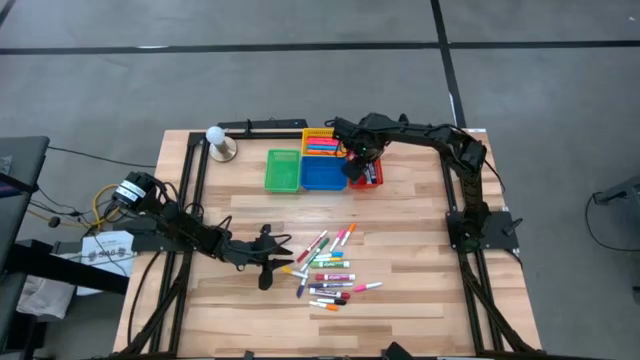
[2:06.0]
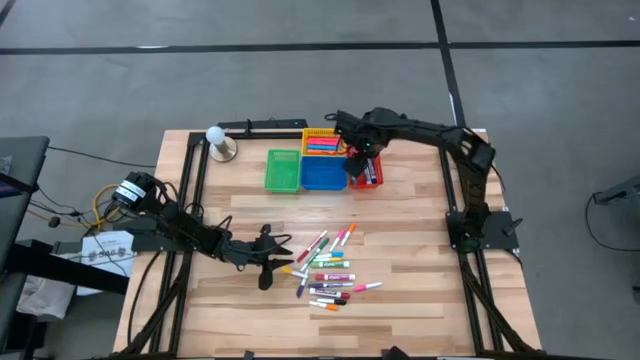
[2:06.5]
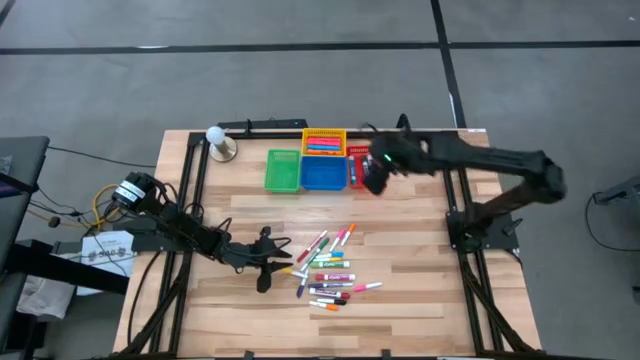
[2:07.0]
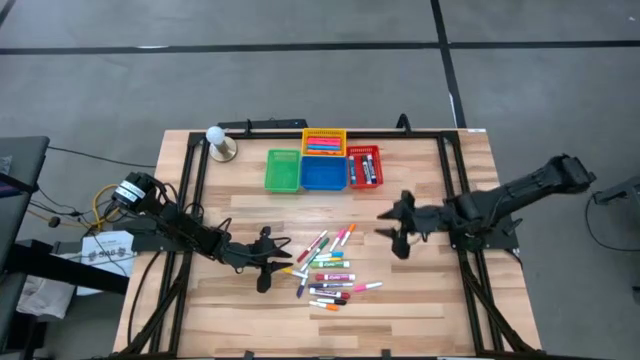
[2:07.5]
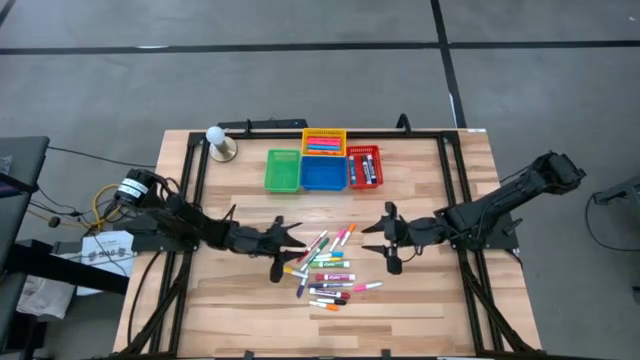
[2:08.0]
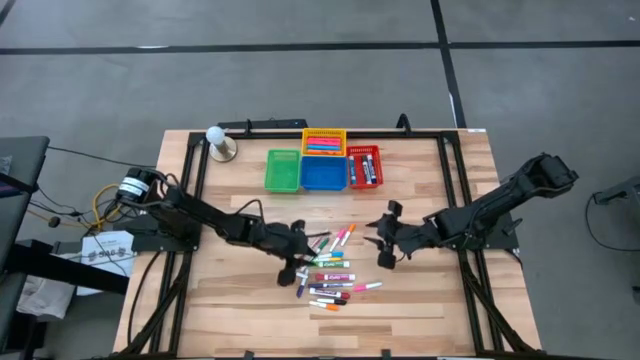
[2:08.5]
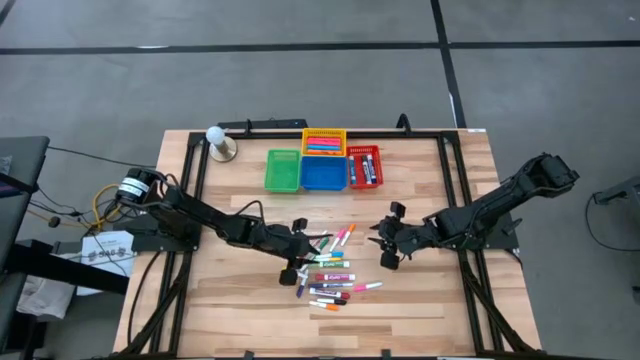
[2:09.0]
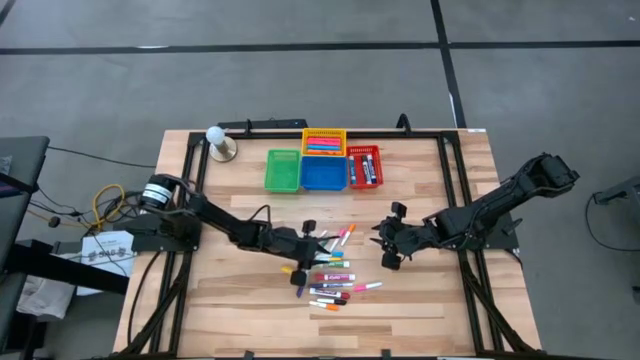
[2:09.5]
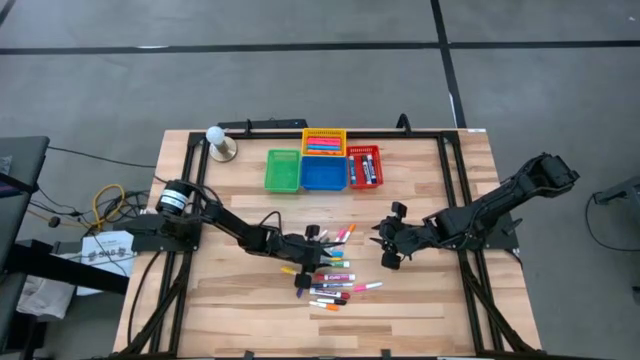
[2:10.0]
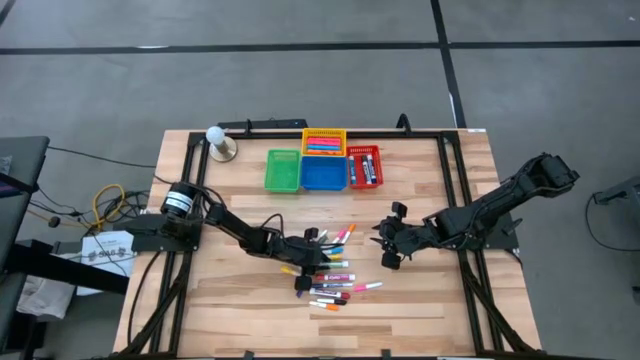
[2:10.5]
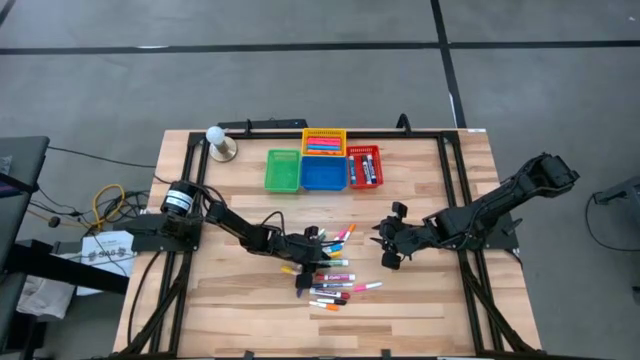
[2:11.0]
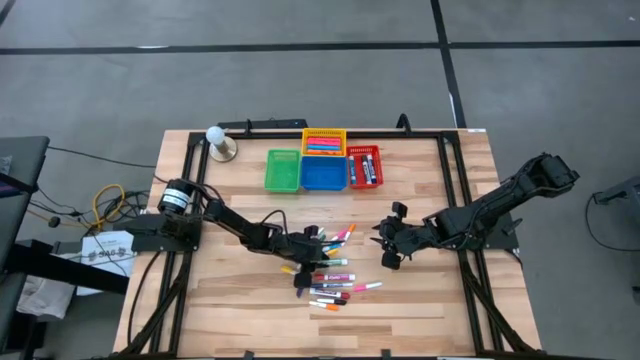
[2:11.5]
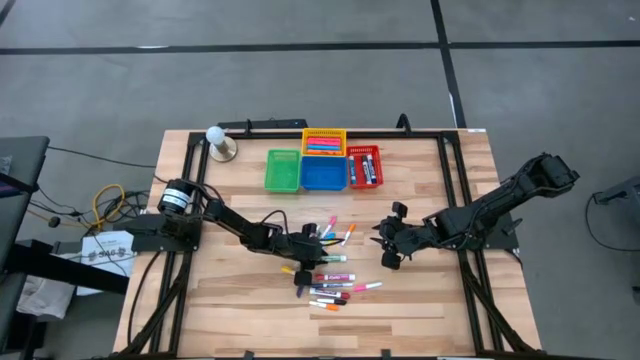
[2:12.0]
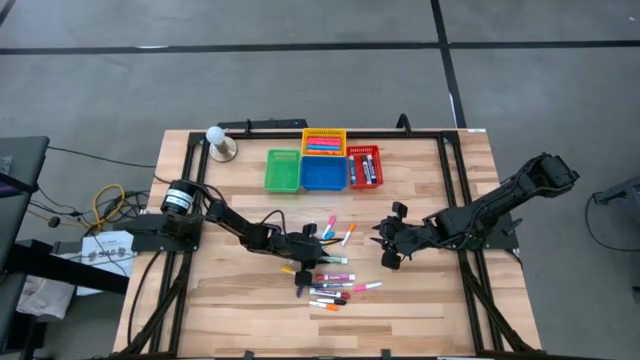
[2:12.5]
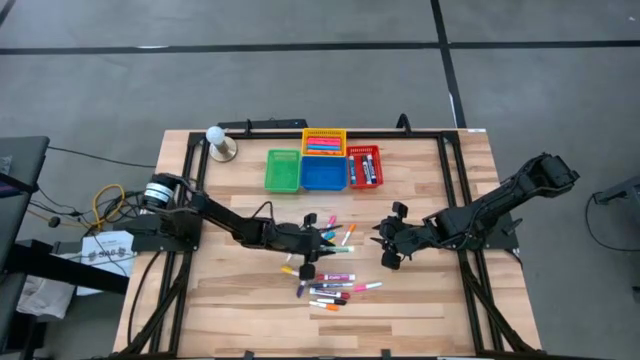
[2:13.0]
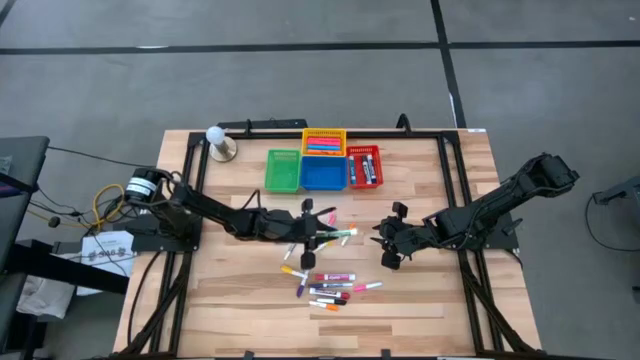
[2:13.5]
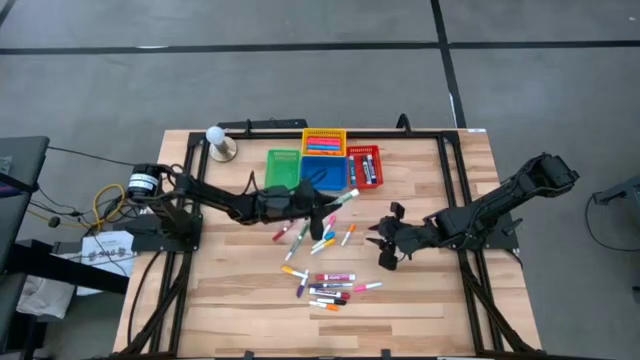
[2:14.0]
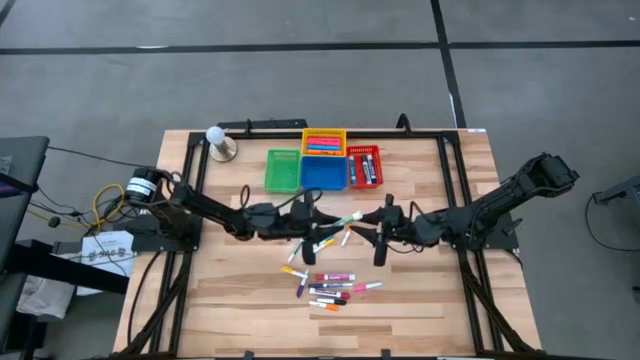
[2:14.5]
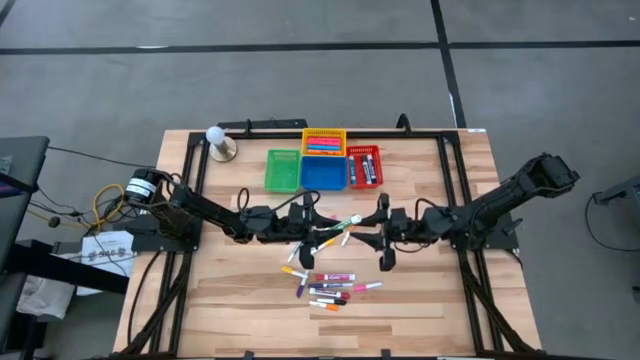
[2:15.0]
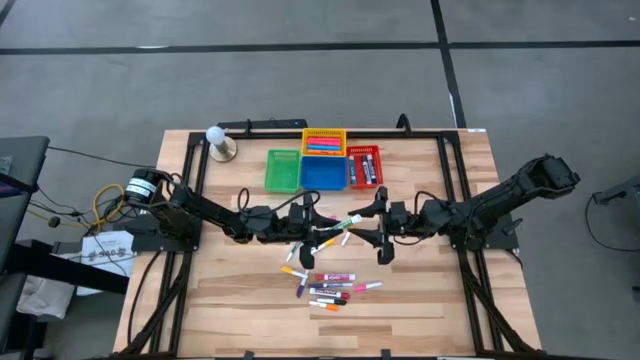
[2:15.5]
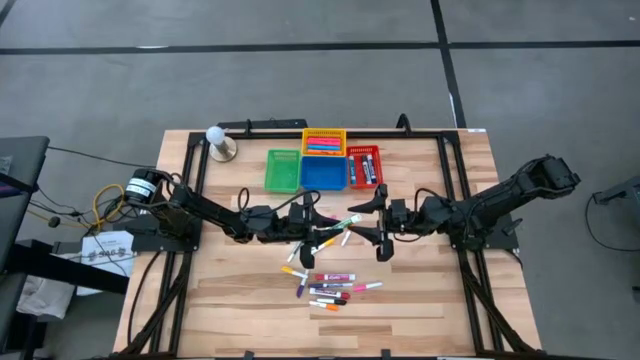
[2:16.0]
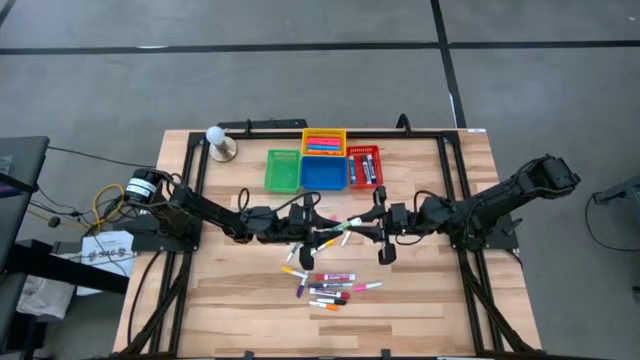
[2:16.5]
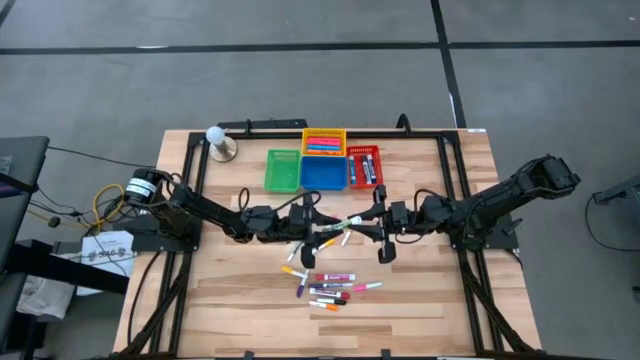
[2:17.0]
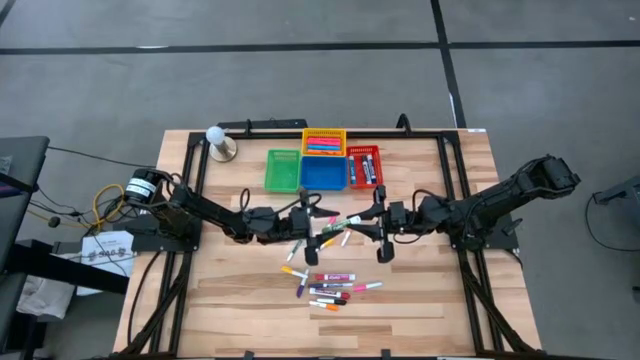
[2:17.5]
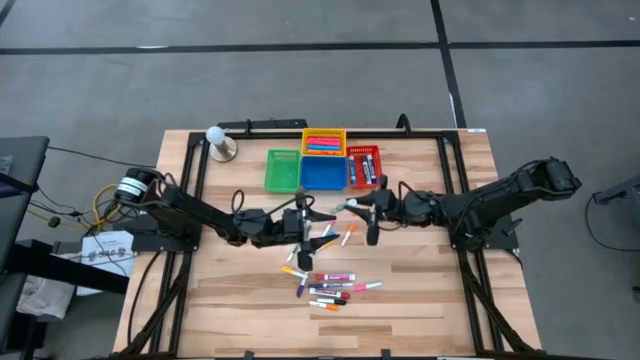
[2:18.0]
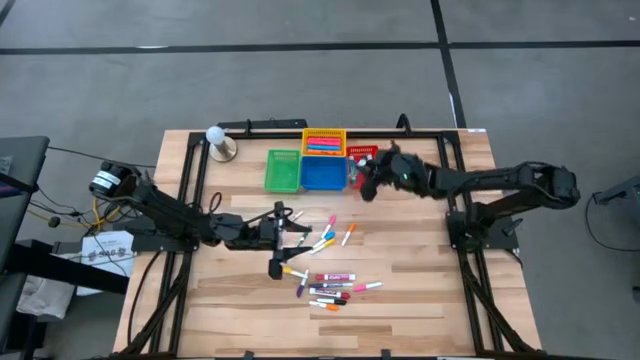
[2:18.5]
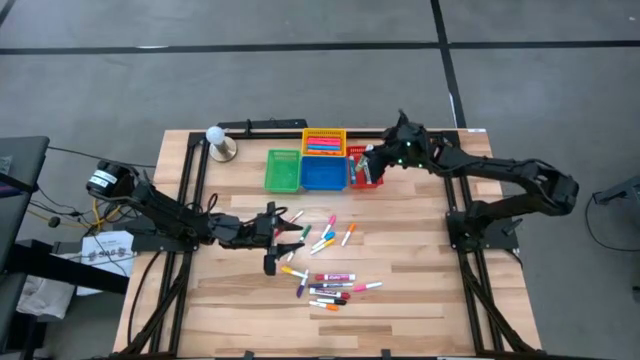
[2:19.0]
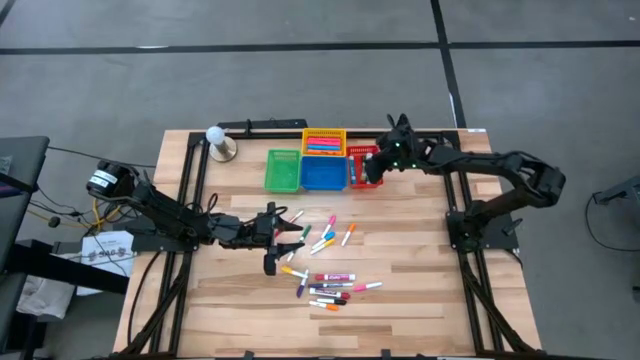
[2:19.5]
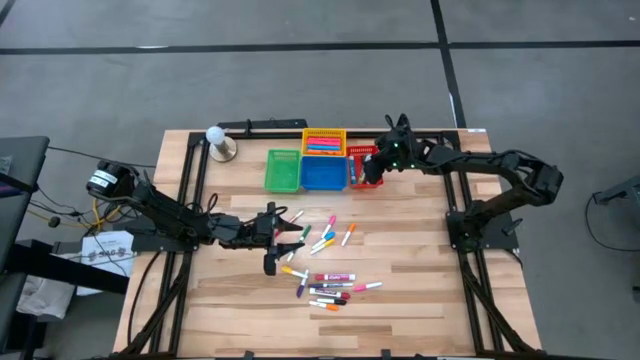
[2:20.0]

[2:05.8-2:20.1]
Task: Pick & Place Markers
Put the large light green marker pen into the red bin

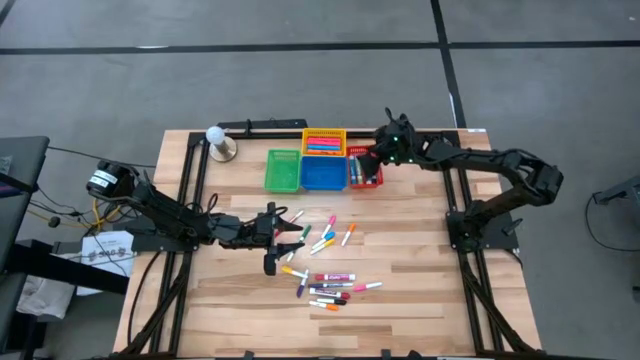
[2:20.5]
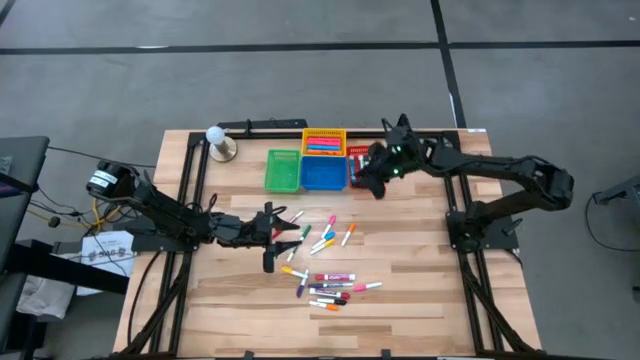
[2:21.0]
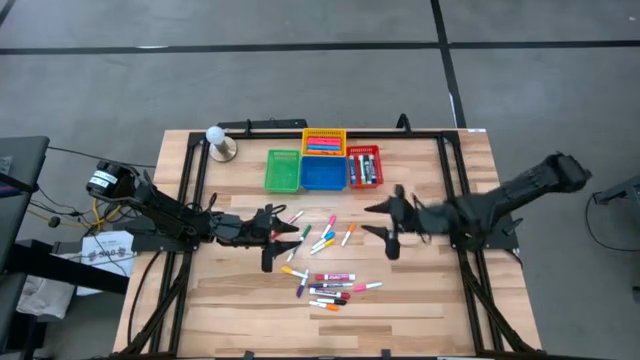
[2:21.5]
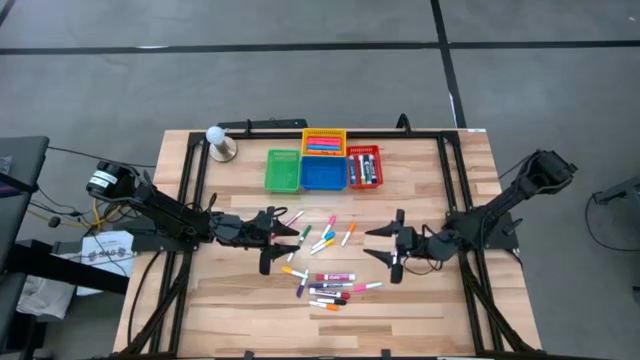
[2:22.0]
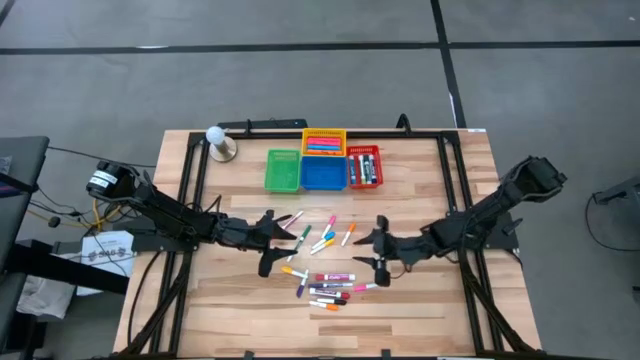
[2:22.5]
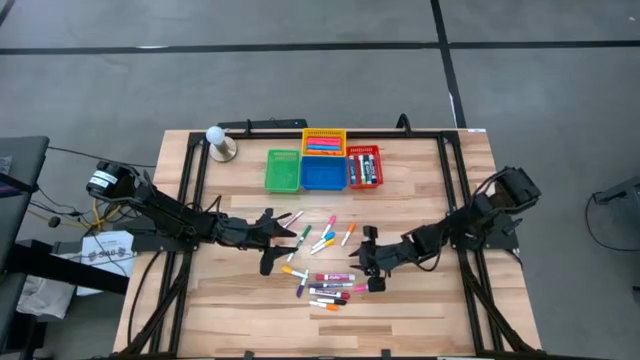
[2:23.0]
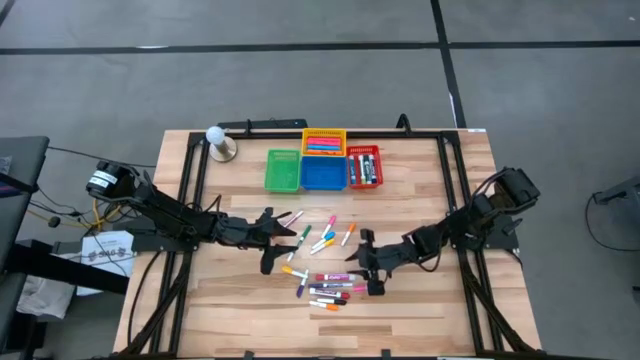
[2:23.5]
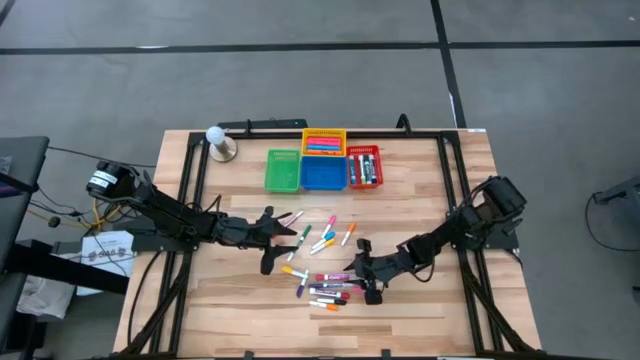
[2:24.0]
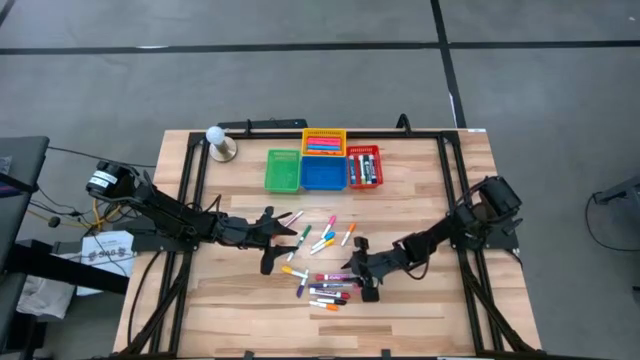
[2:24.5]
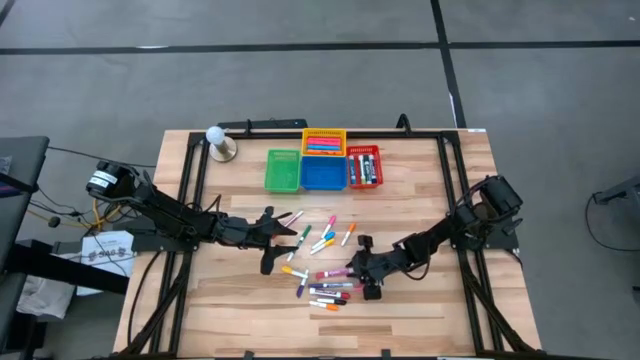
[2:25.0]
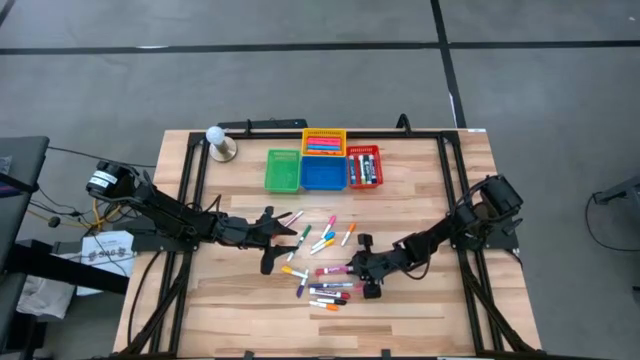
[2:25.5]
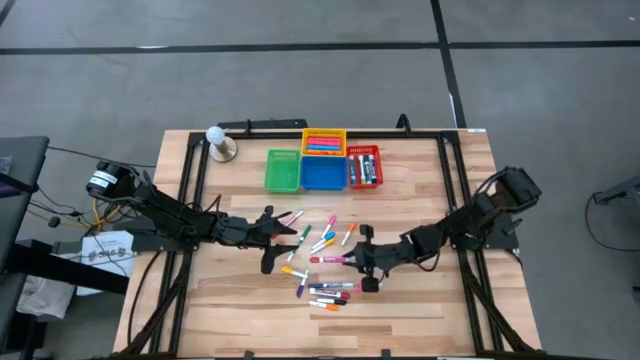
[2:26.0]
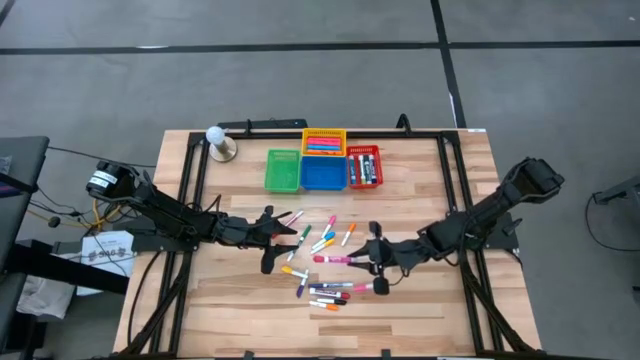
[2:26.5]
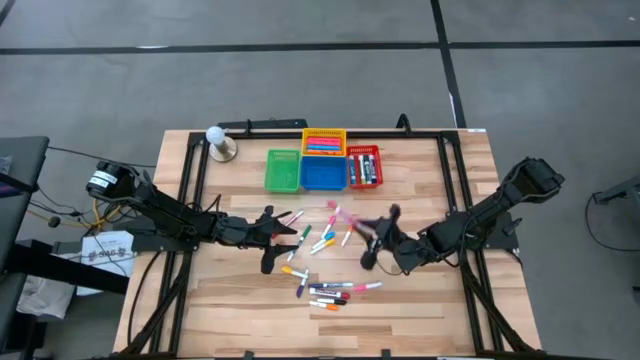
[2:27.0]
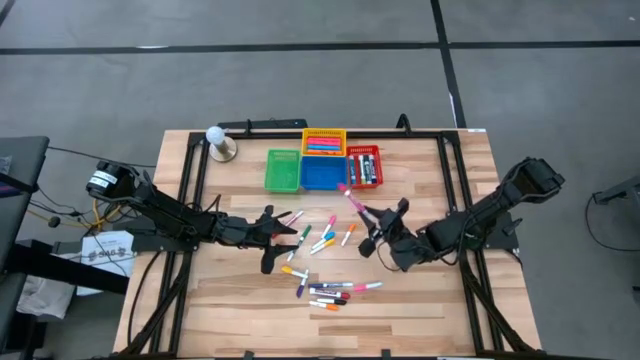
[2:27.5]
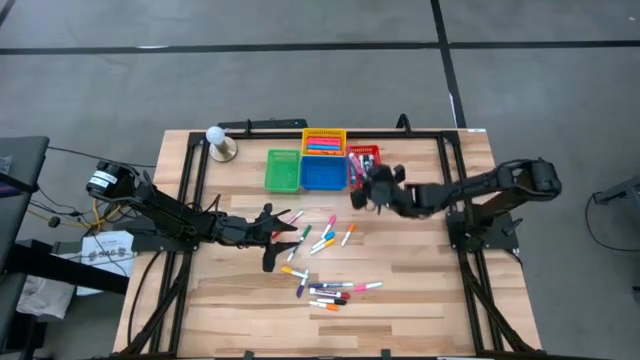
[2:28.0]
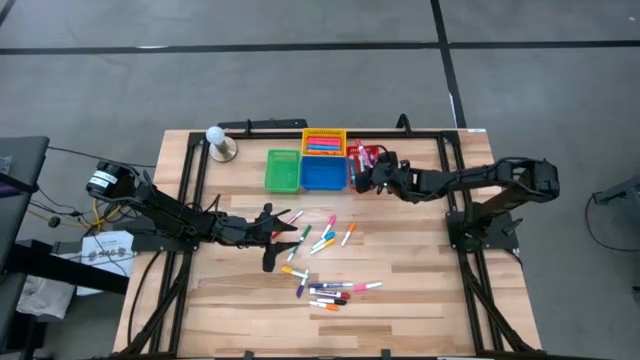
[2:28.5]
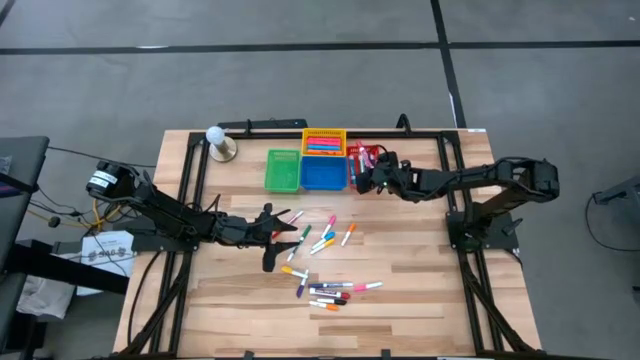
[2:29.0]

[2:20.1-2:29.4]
Put the large pink marker pen into the red bin
